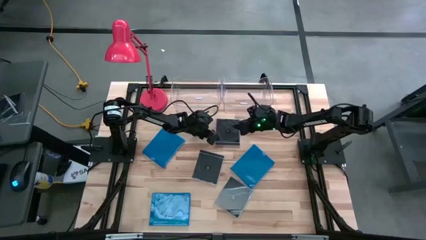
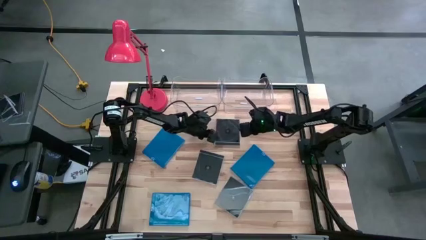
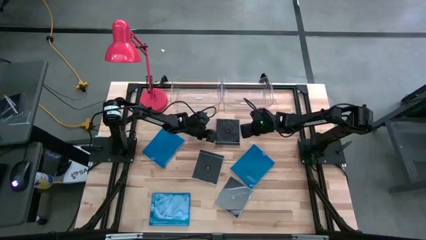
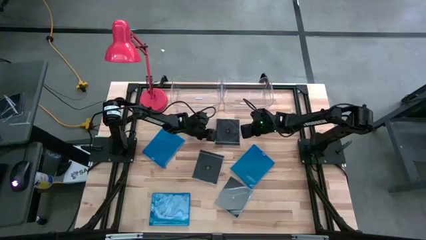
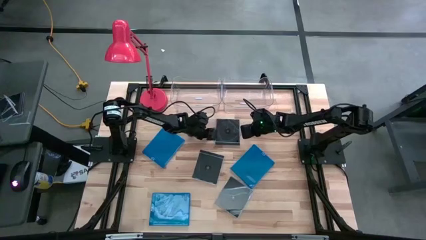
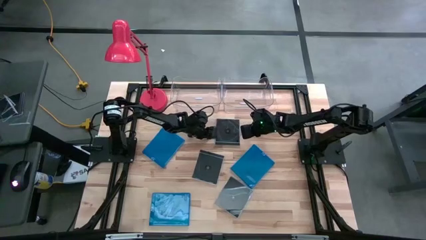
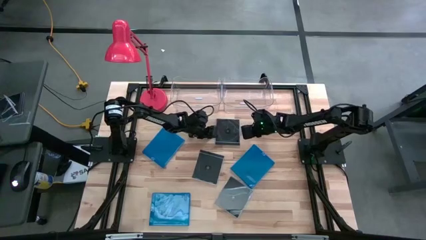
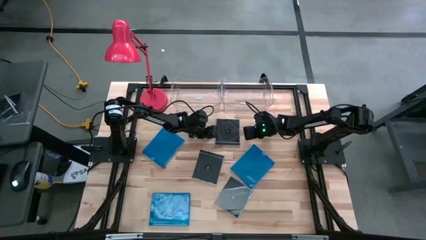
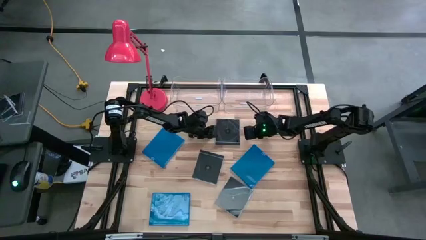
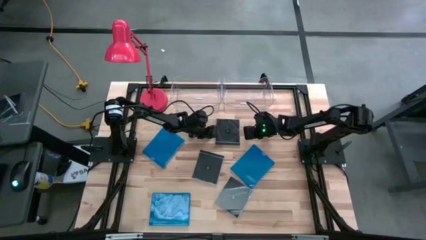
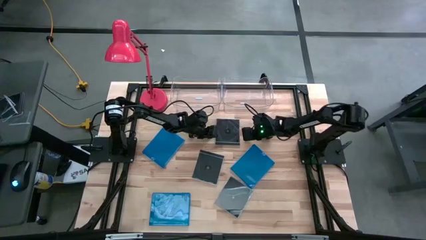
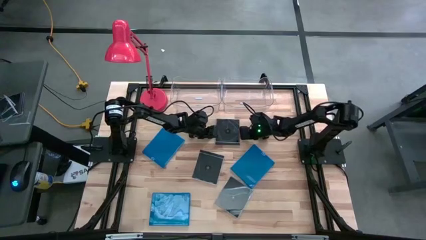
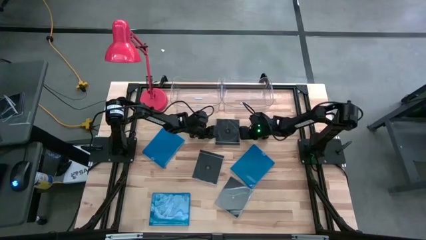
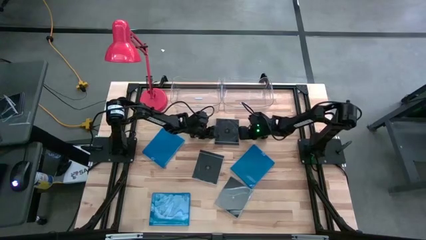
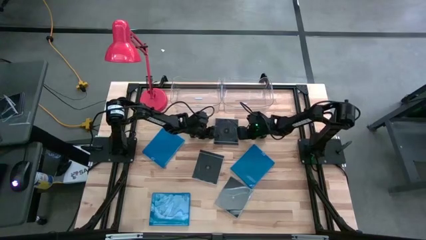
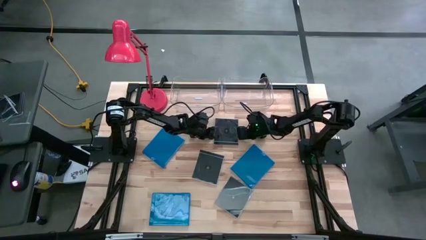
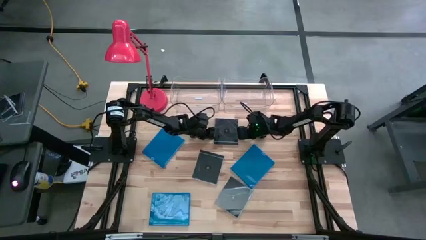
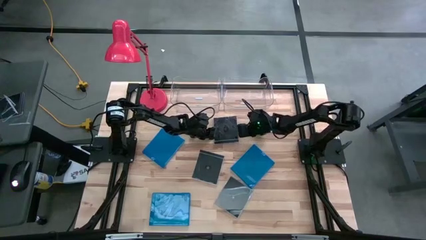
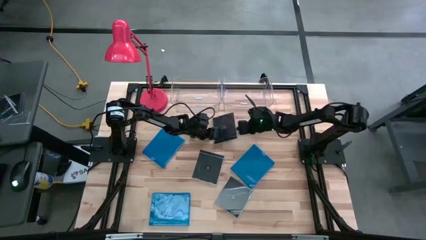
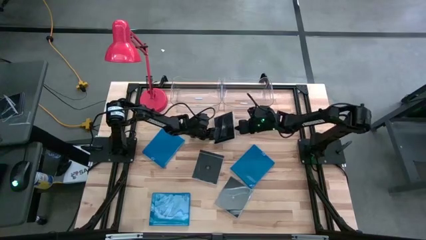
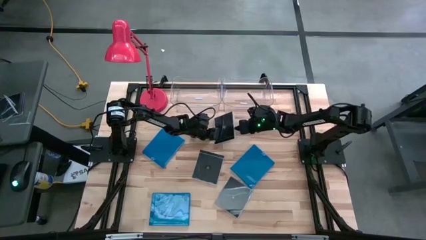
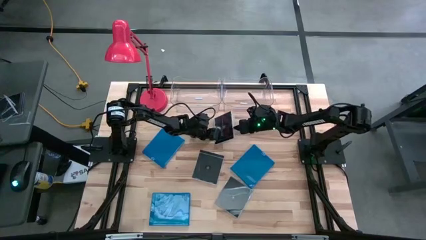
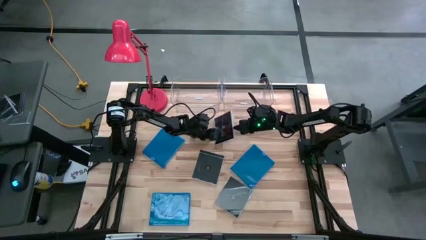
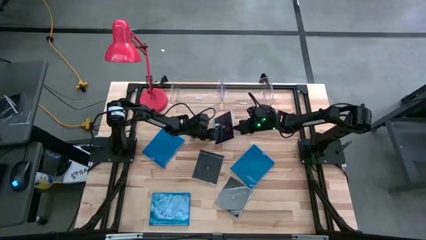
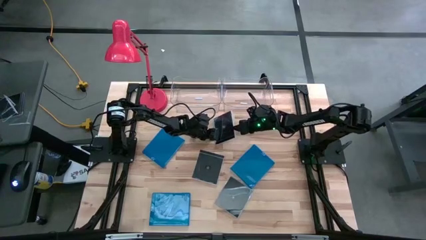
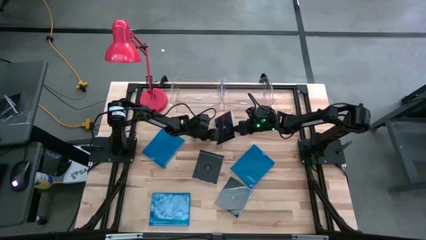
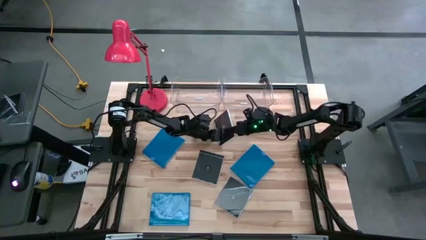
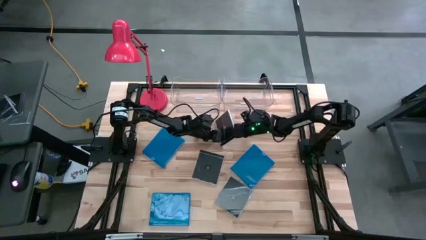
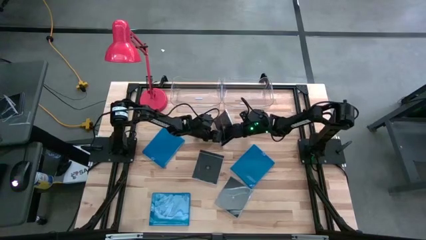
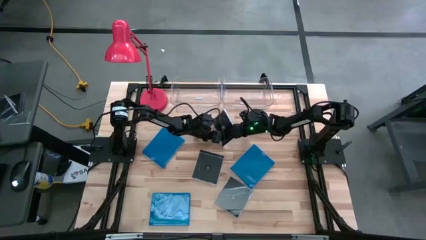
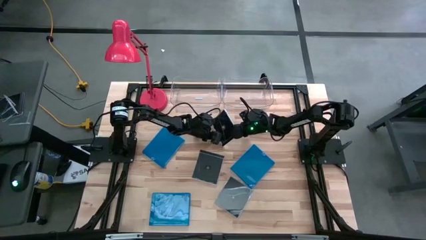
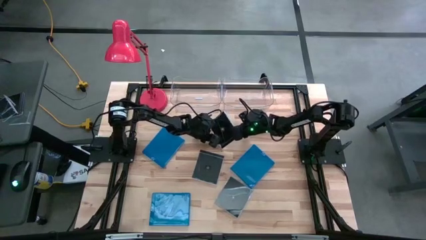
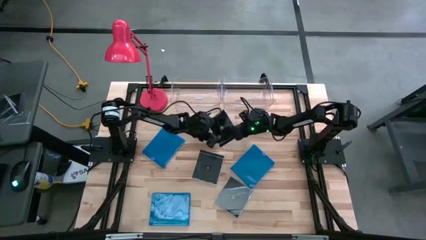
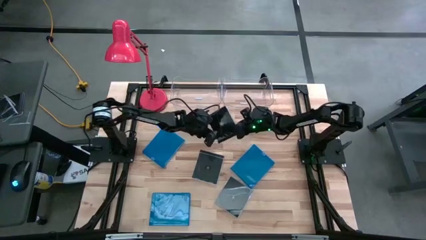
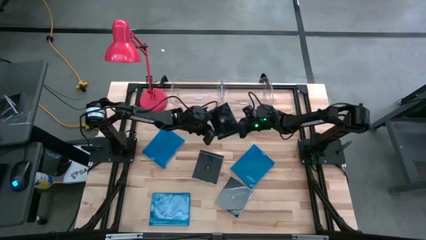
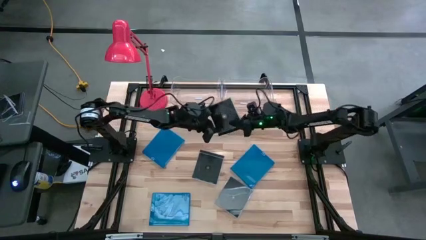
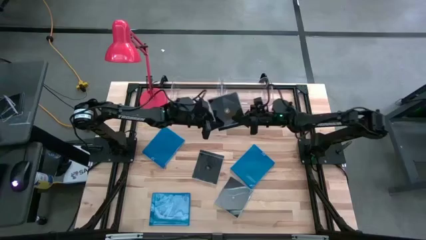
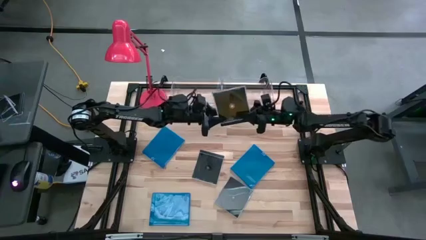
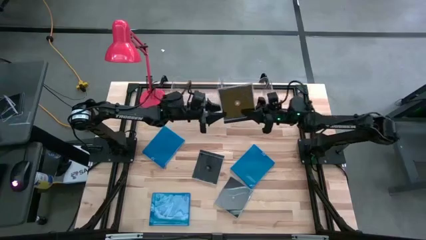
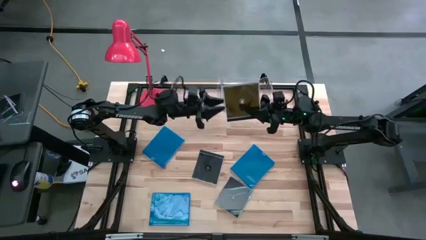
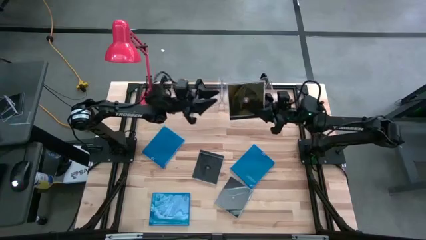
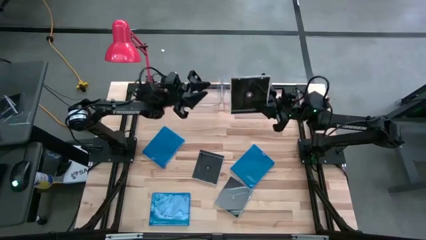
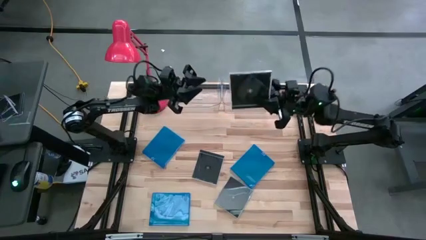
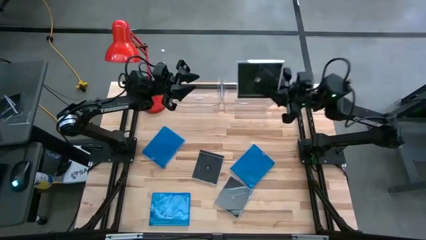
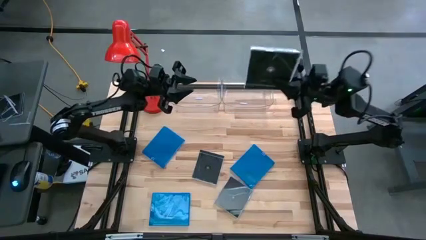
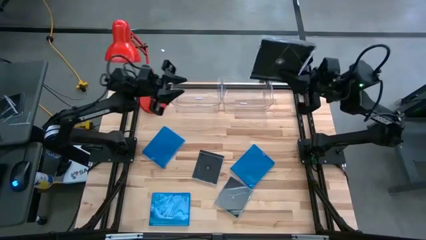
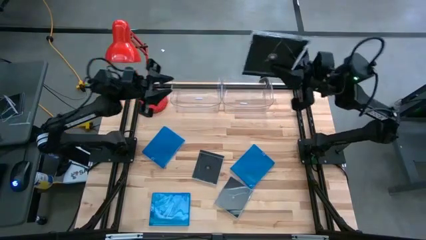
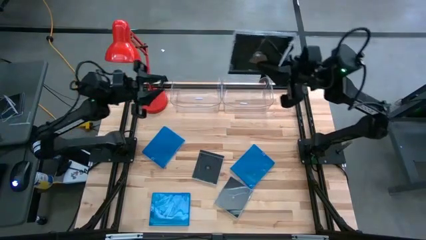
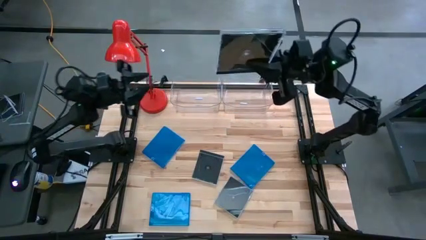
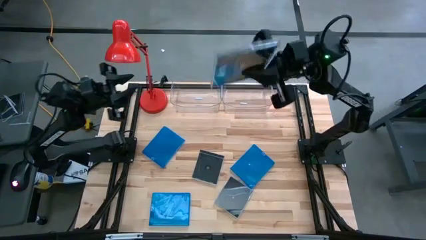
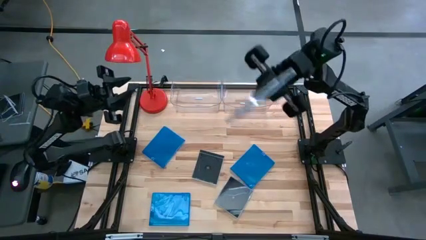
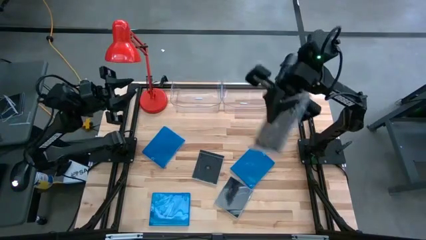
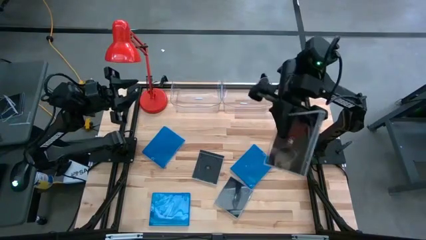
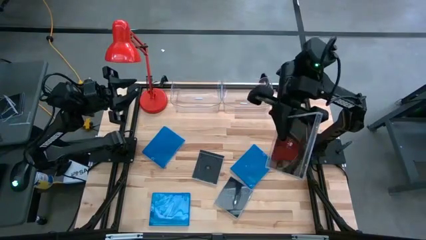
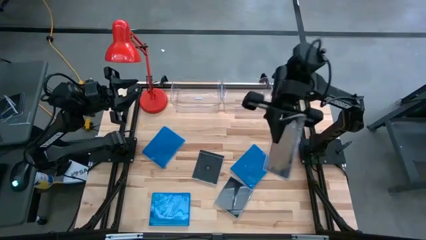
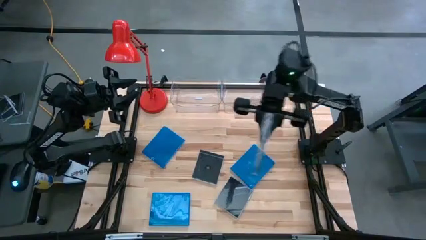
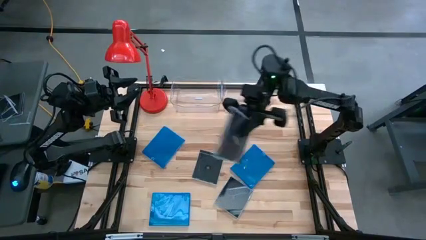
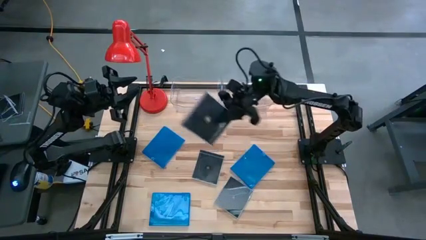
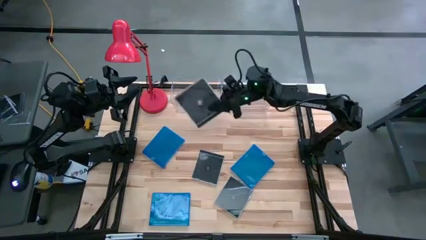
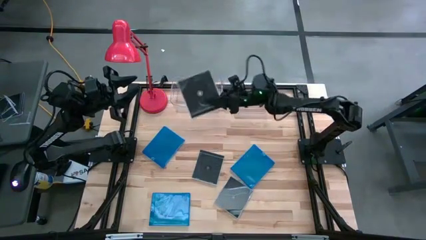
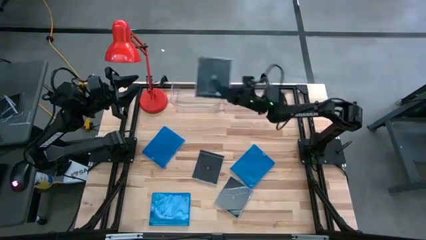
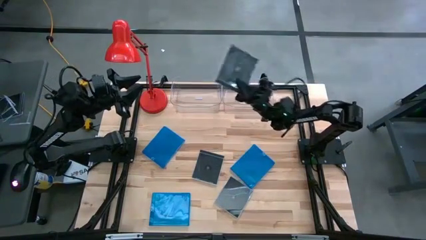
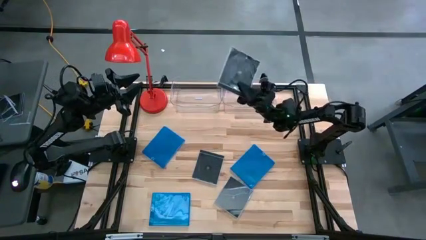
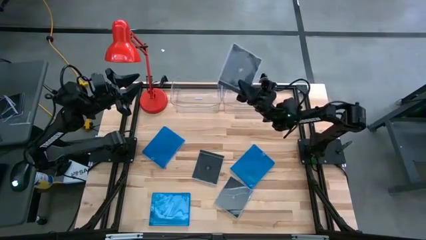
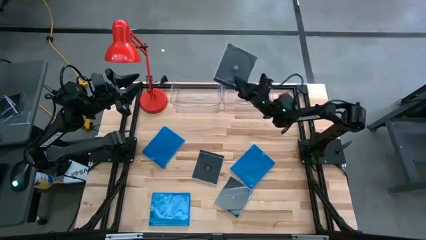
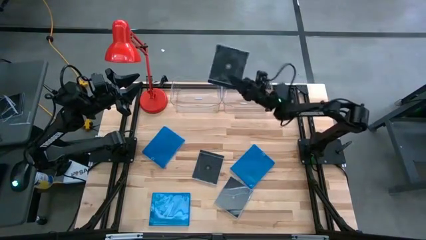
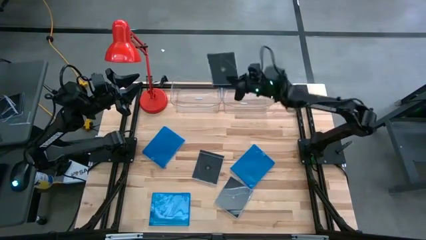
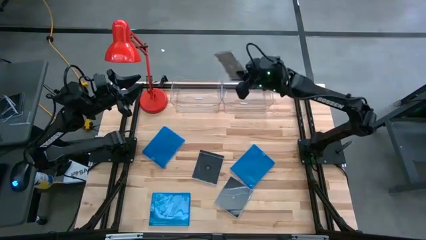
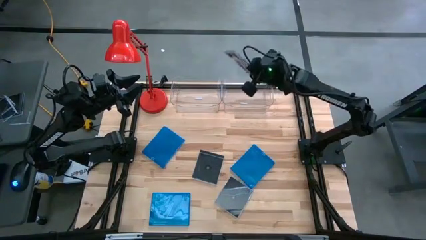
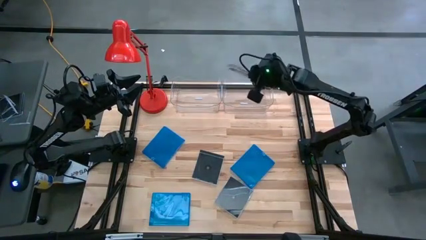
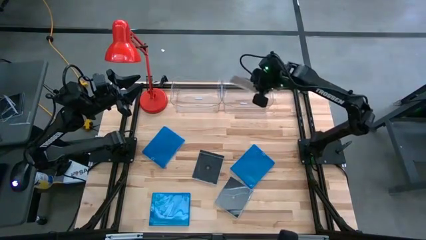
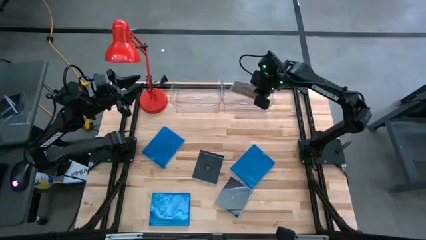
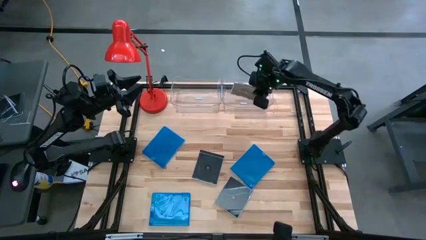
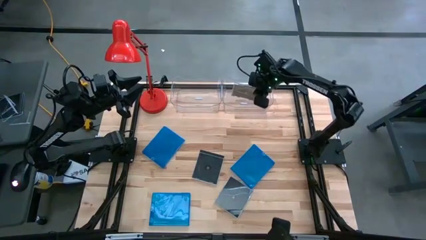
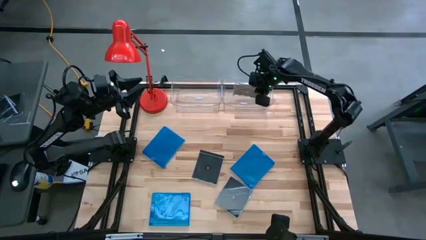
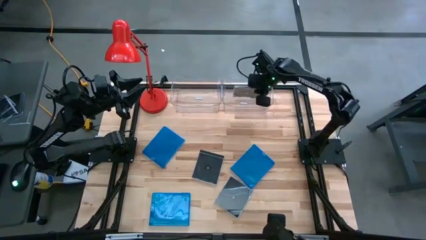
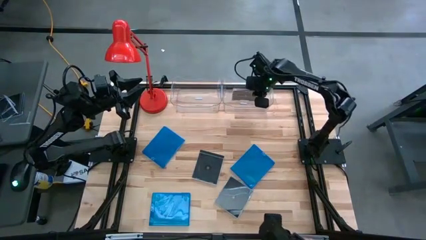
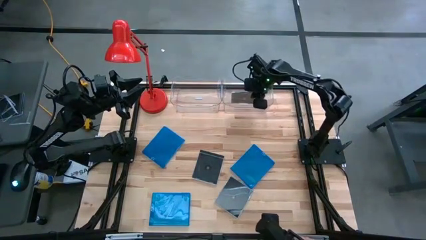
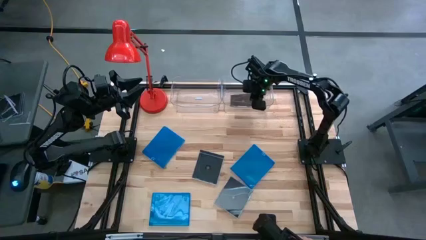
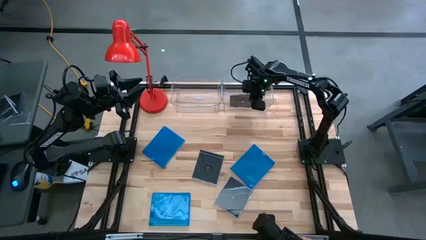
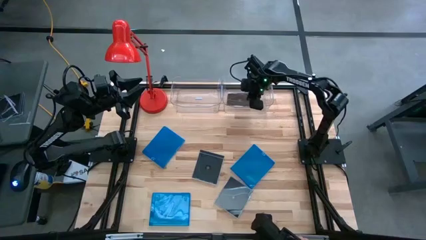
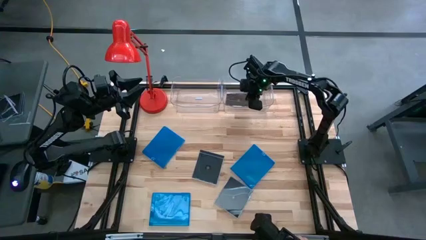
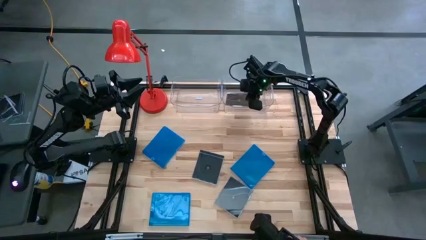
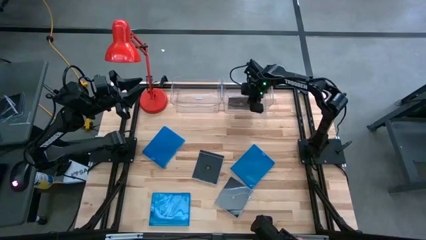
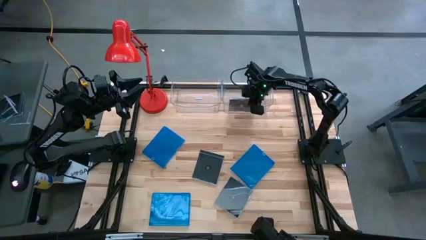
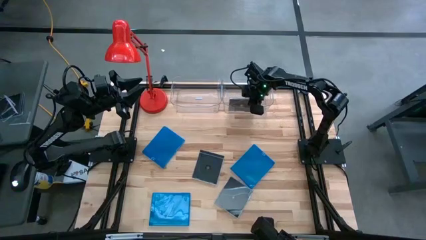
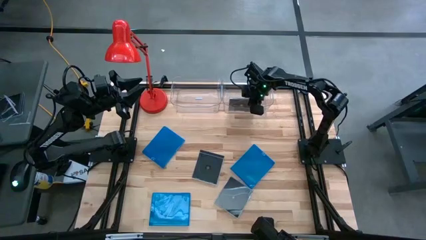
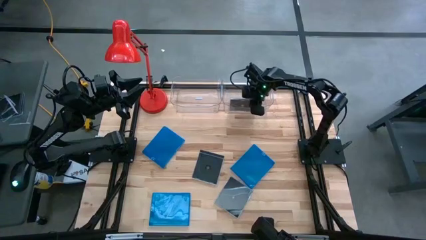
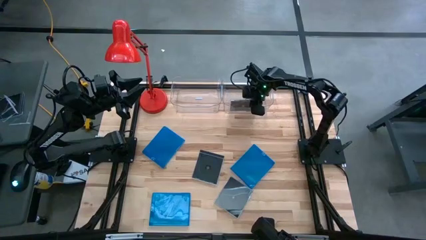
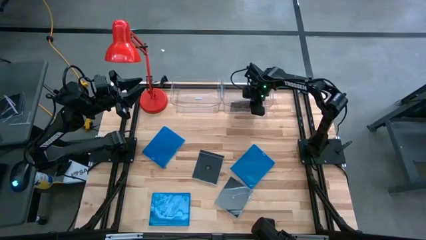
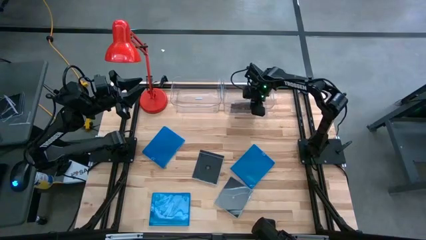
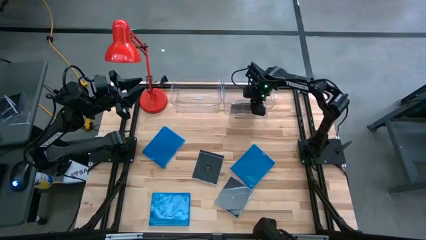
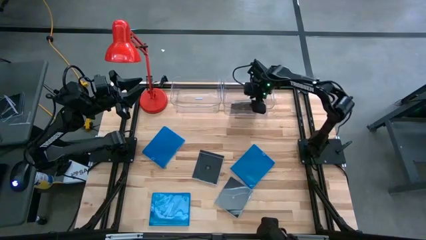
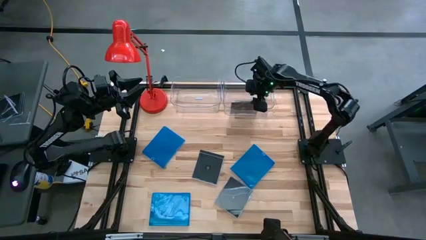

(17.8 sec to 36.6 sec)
Task: Pick & place jewel cases by type
Put the top black cd case into the right transparent bin
